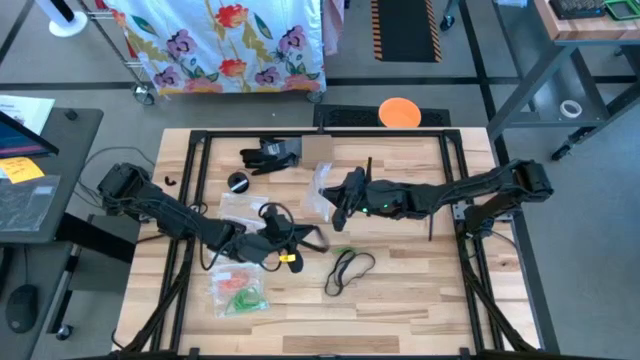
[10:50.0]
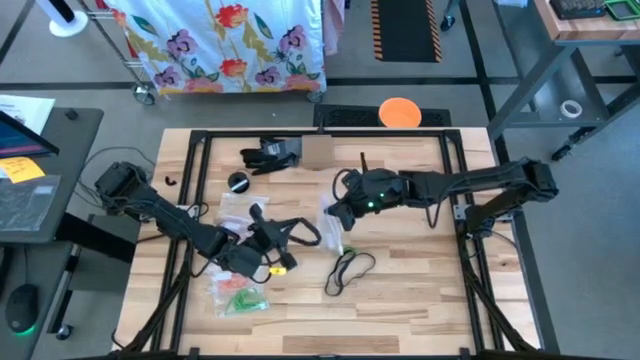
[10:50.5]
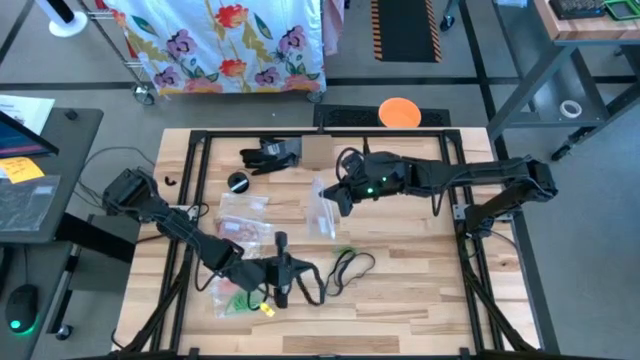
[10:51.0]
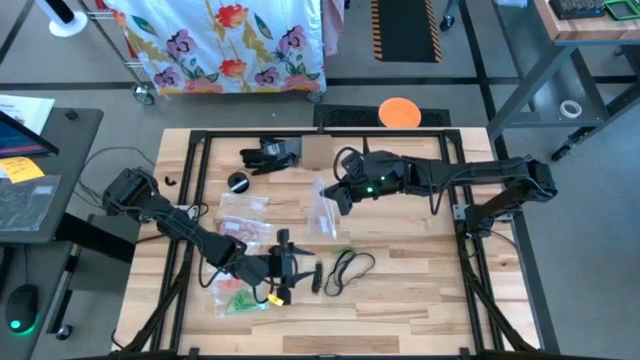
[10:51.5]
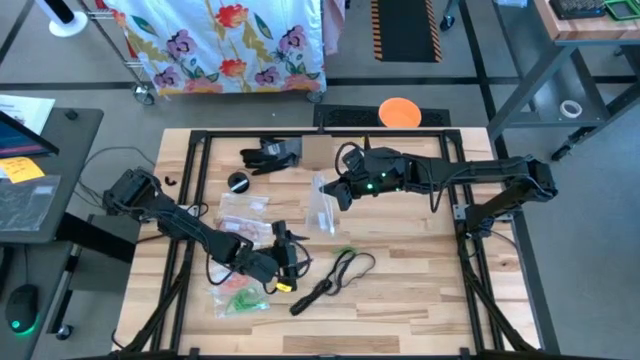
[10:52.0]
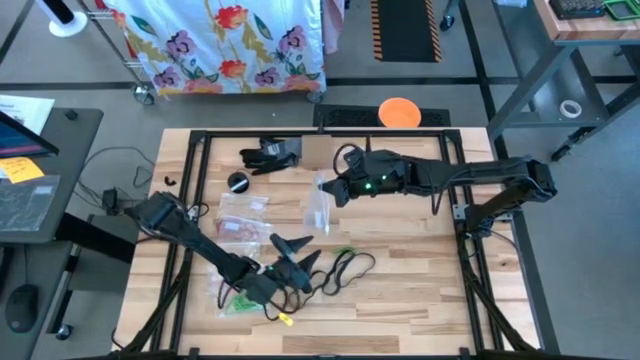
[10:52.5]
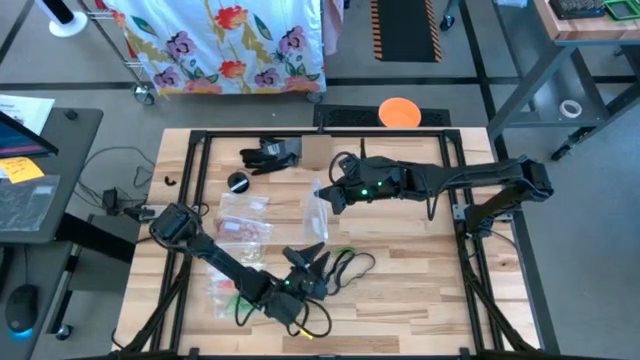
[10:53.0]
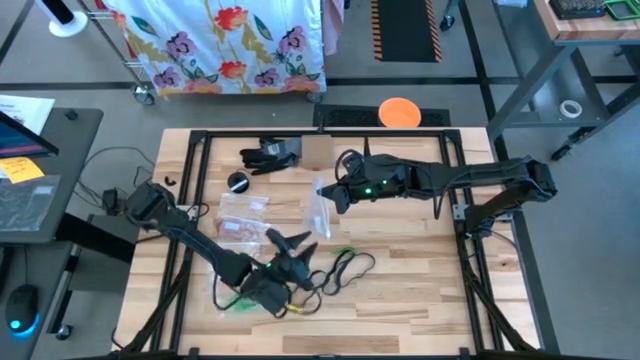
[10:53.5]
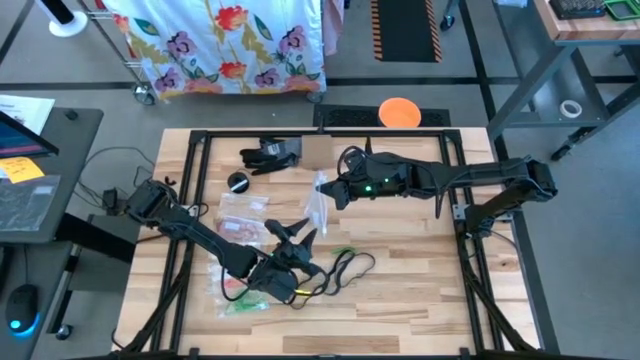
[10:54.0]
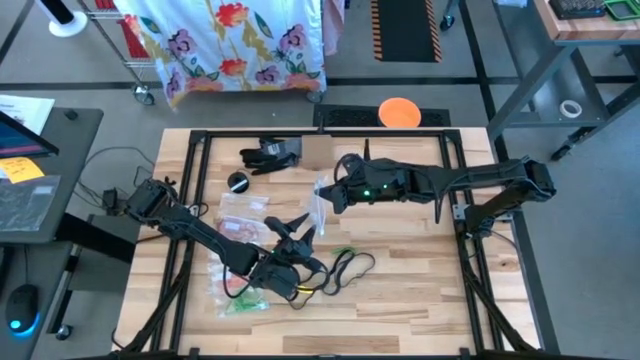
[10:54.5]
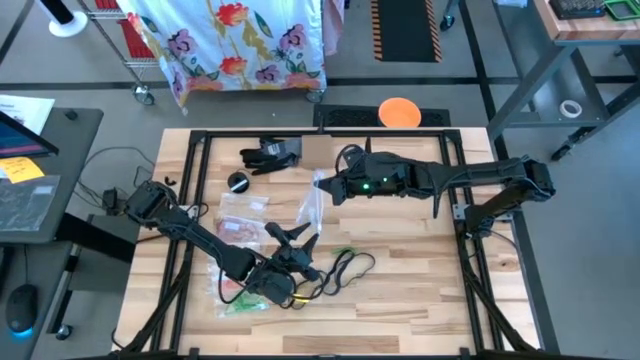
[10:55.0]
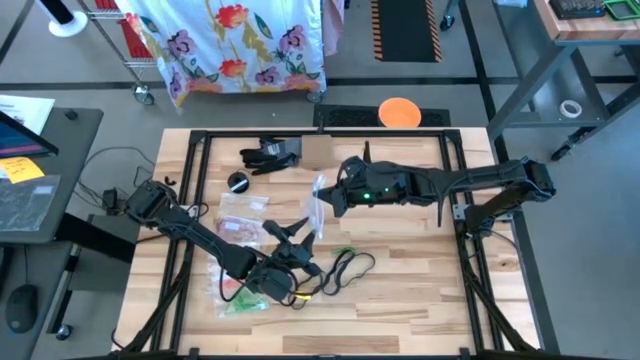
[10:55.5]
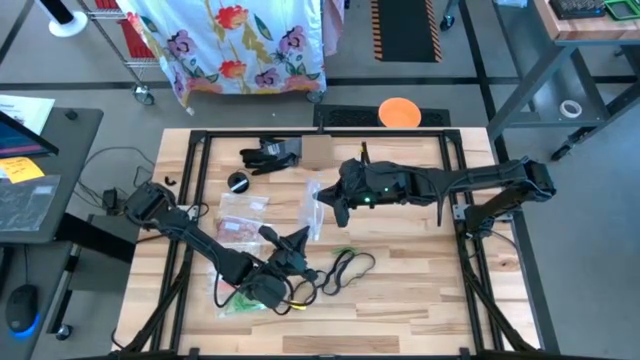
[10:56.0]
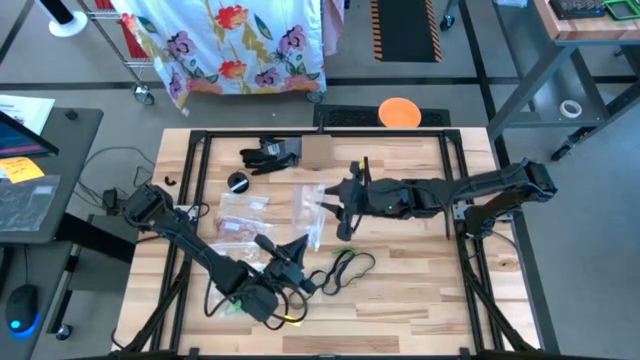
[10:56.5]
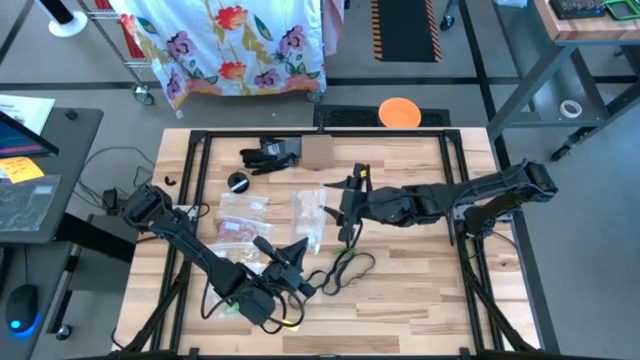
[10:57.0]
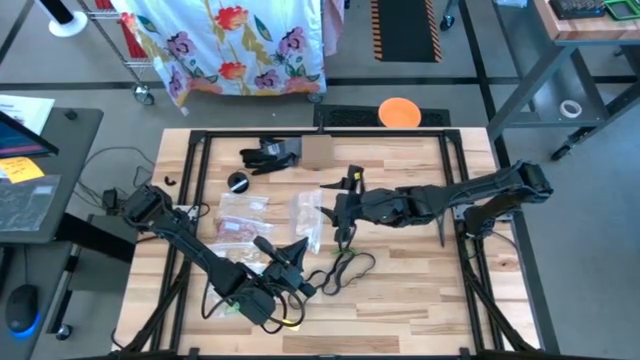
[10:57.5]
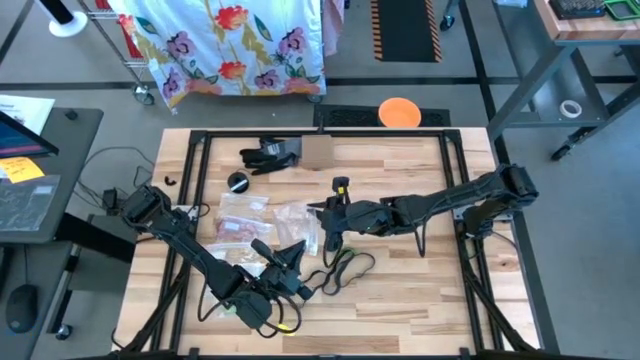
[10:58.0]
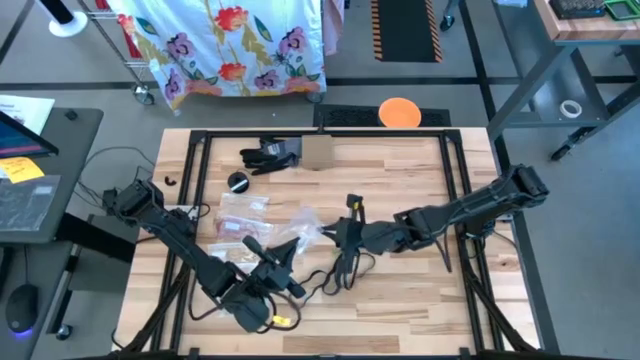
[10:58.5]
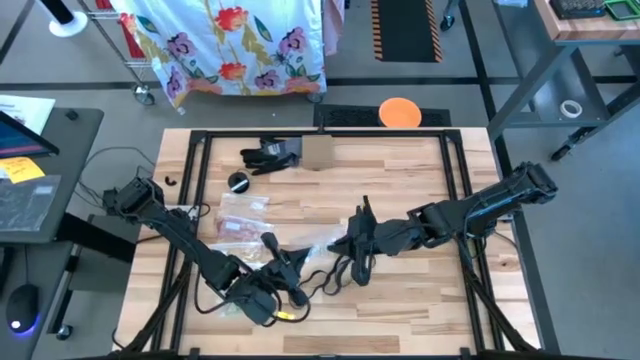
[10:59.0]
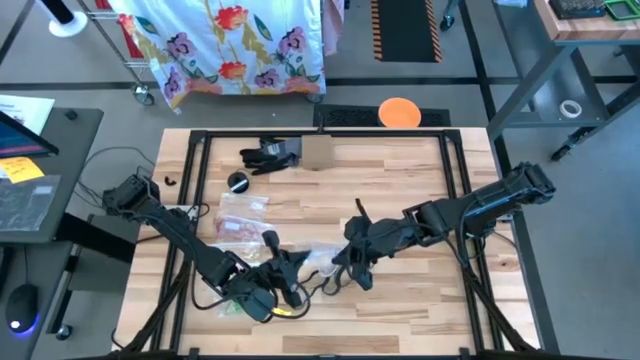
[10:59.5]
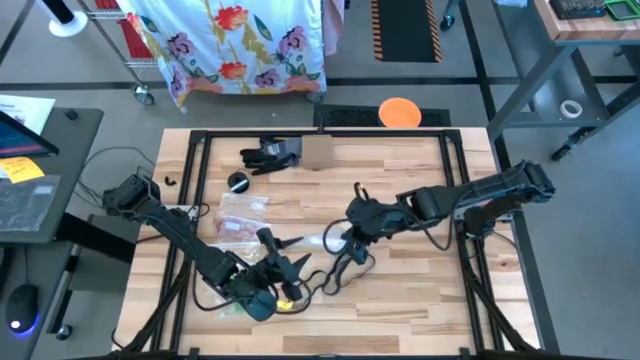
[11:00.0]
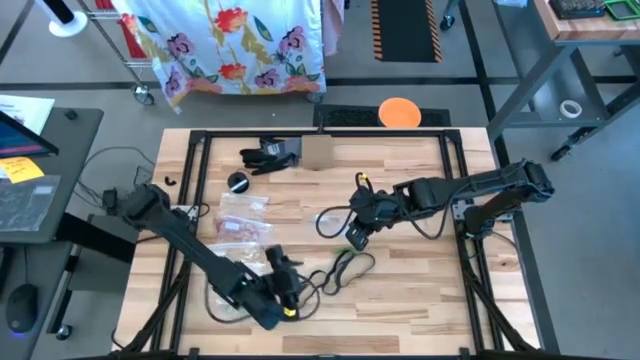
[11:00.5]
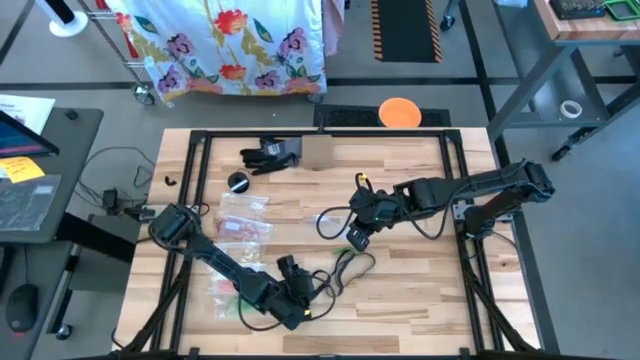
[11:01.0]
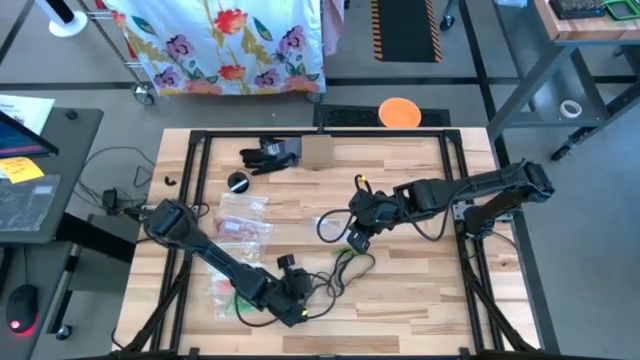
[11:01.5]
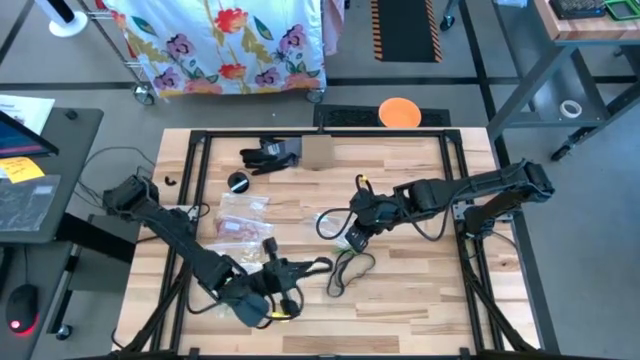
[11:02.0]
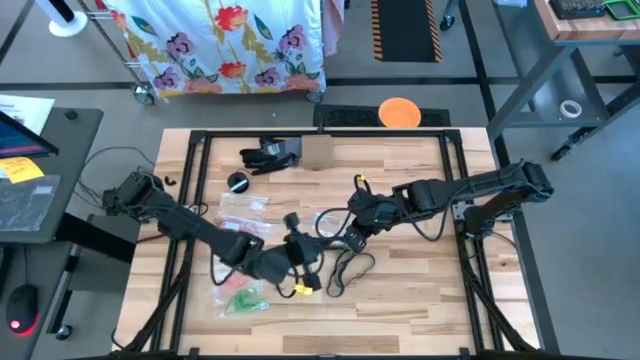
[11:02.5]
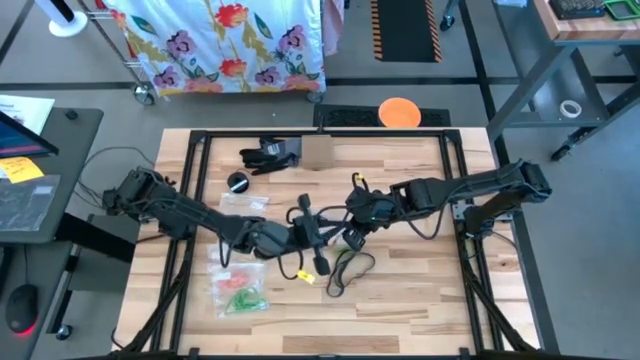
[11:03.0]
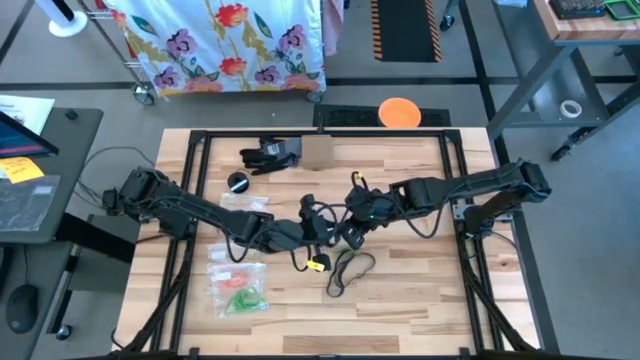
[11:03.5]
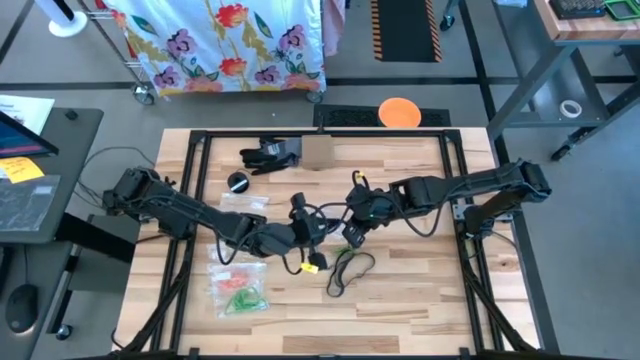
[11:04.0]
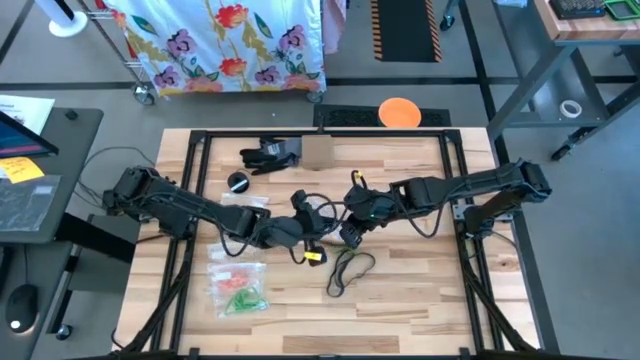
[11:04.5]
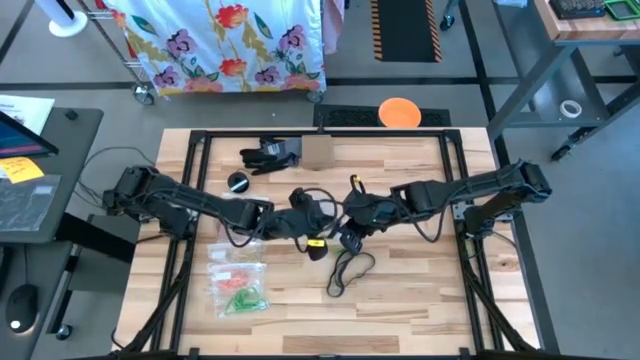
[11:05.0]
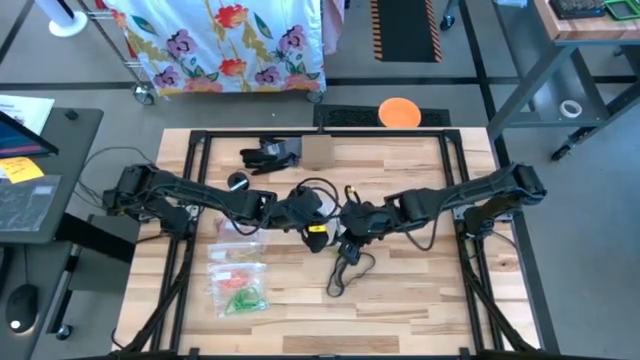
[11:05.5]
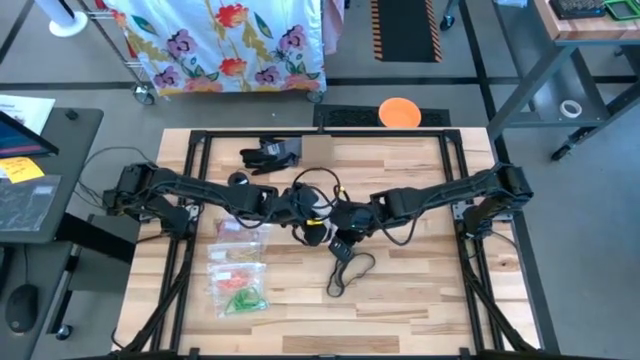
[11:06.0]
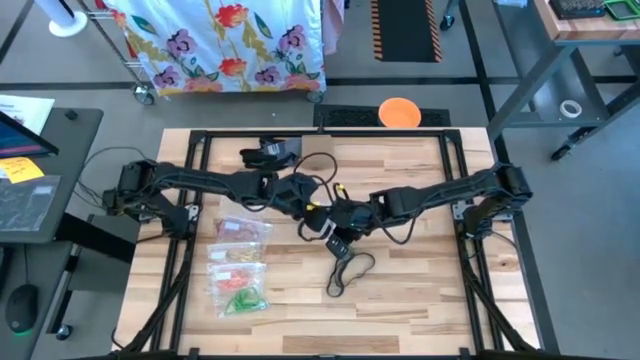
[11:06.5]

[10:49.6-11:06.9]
Task: Sort rubber bands
Put the black rubber band into the transparent zip bag

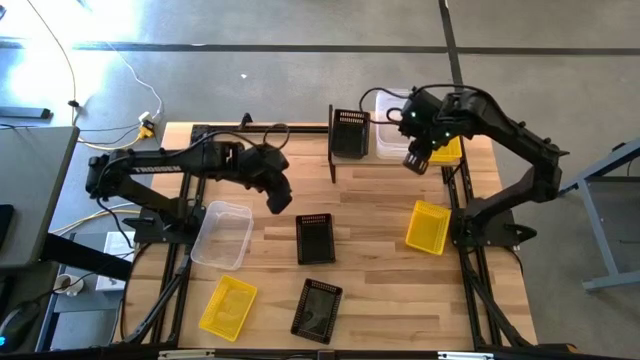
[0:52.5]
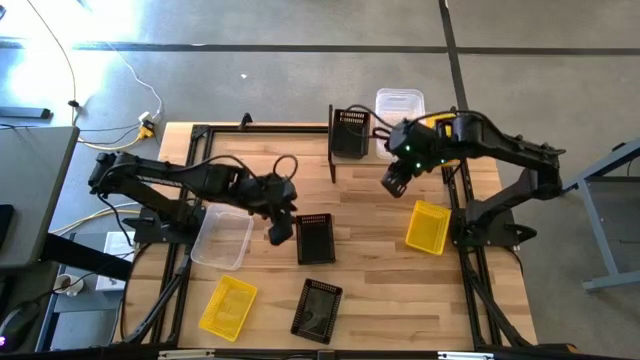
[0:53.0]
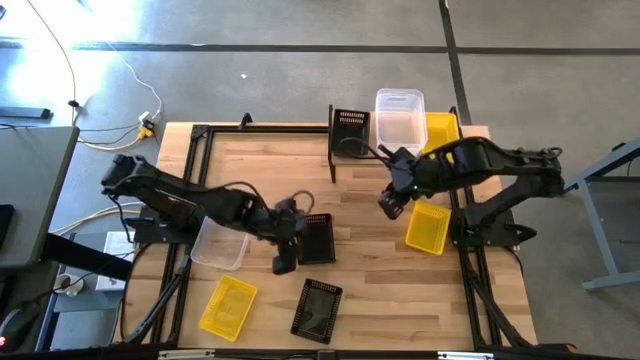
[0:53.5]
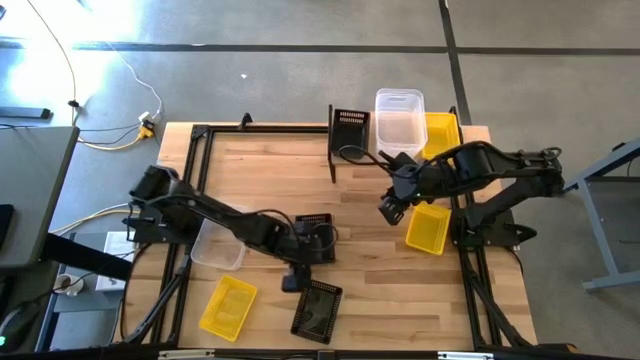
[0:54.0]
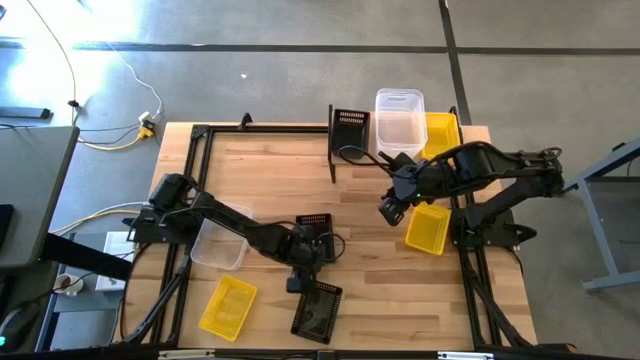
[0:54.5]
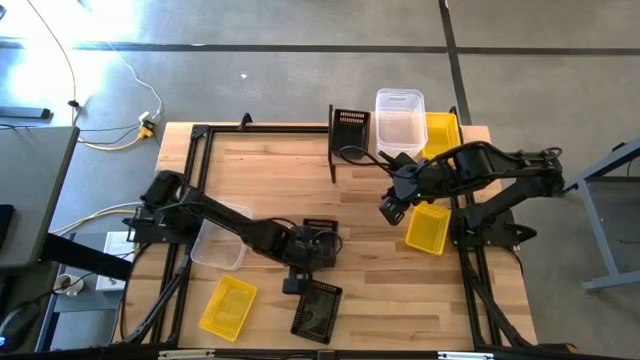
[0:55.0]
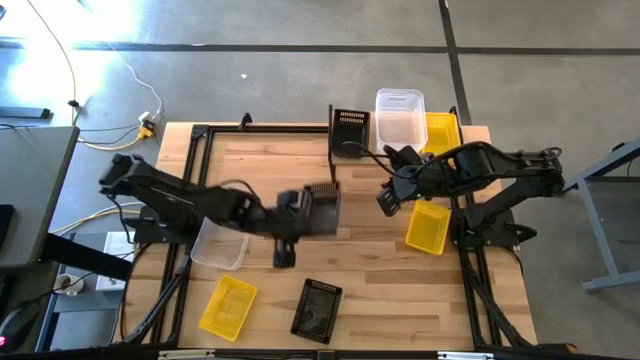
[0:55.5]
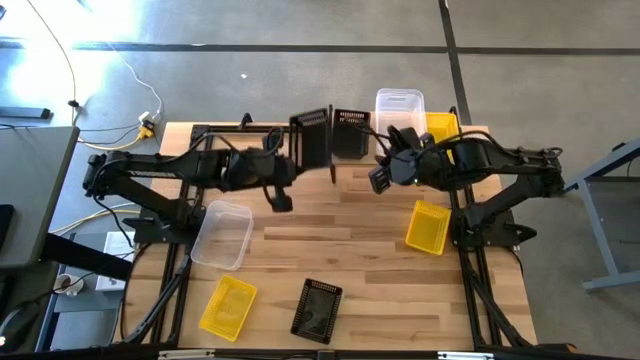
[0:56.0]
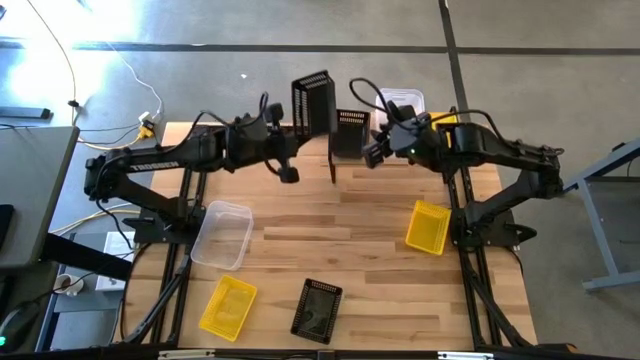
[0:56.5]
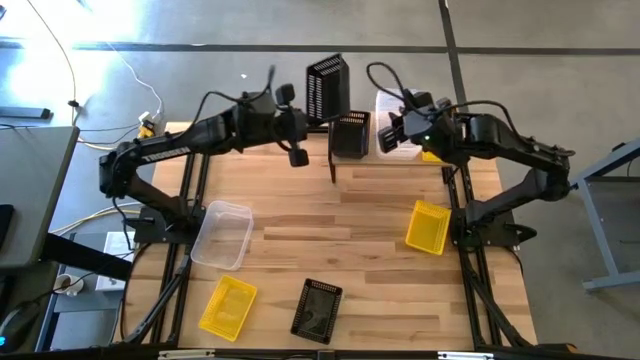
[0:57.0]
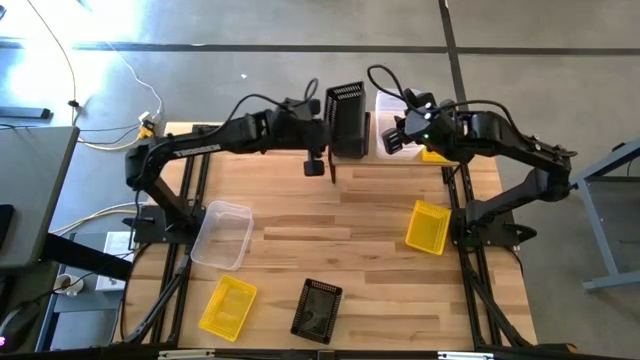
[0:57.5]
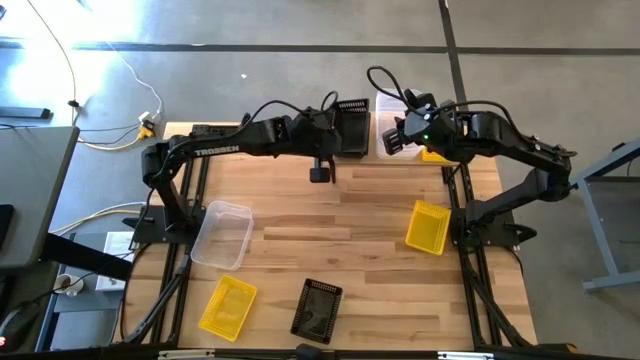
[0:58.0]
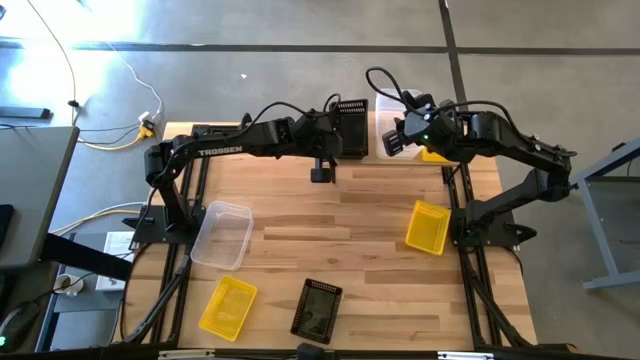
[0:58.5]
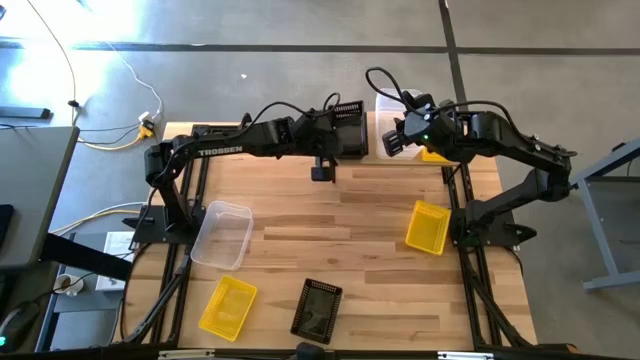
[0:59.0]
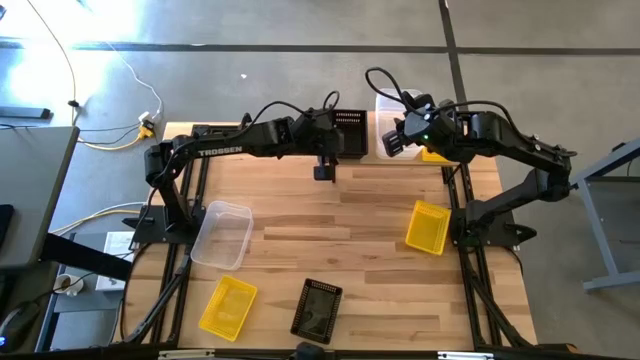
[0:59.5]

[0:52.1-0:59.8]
Task: Stack baskets on shelf by color
Stack the top black bin on top of the black bin on the shelf
